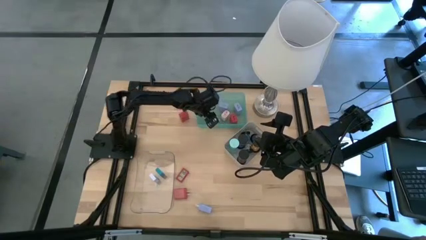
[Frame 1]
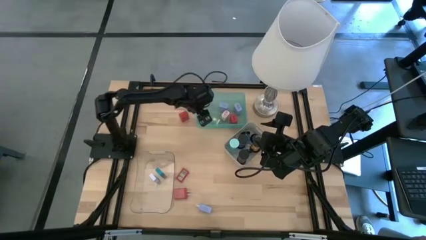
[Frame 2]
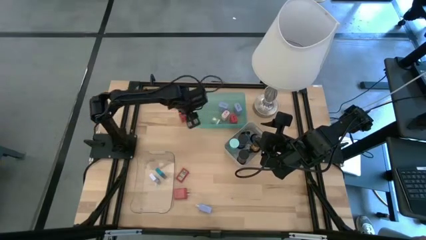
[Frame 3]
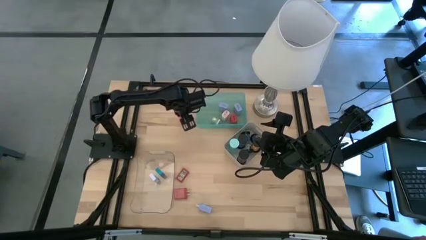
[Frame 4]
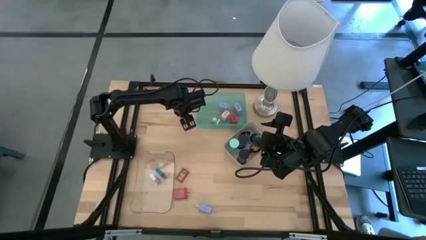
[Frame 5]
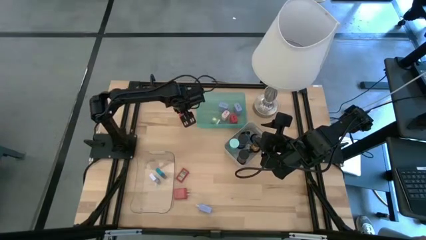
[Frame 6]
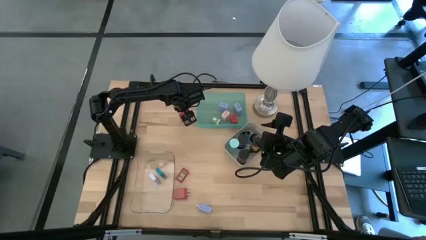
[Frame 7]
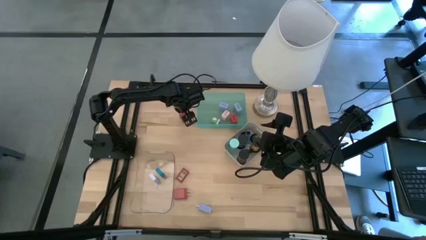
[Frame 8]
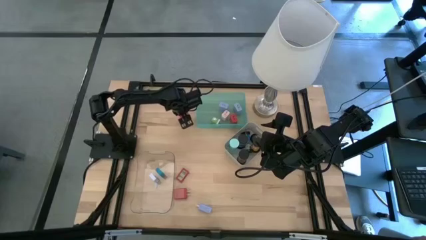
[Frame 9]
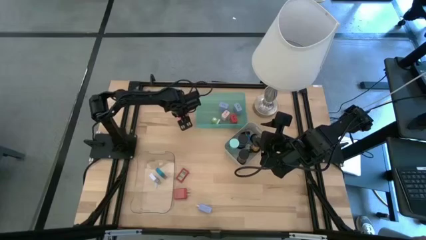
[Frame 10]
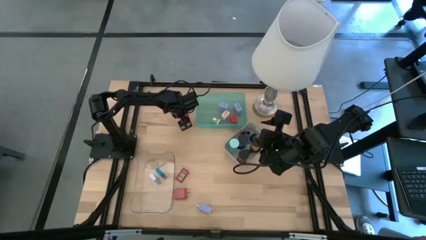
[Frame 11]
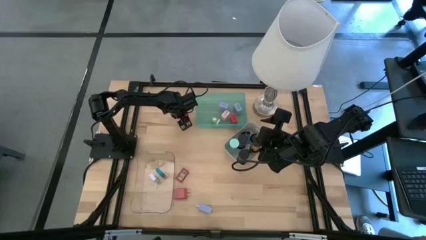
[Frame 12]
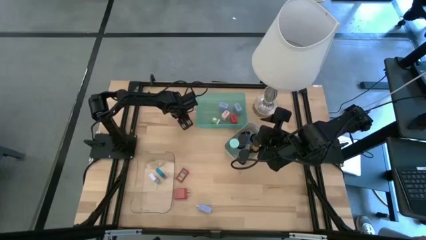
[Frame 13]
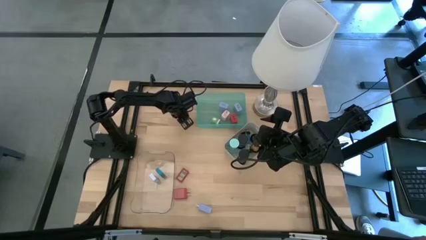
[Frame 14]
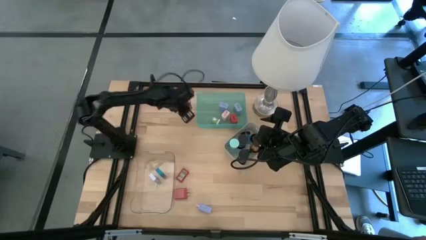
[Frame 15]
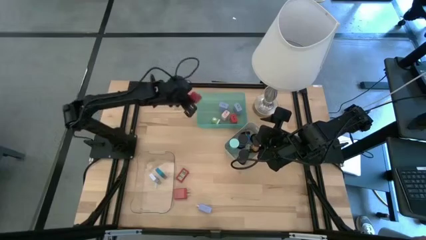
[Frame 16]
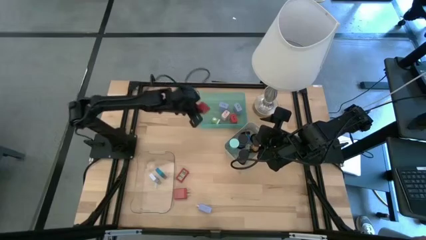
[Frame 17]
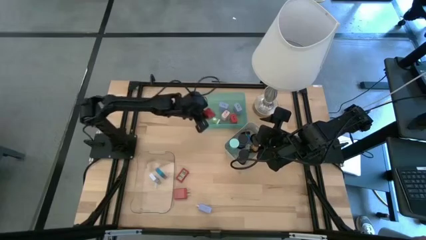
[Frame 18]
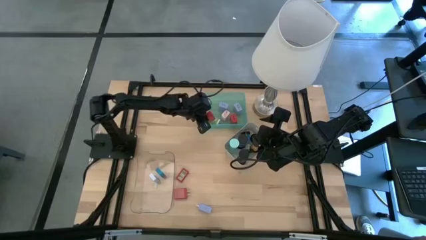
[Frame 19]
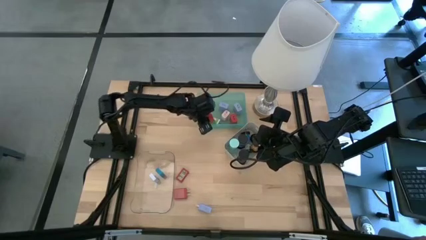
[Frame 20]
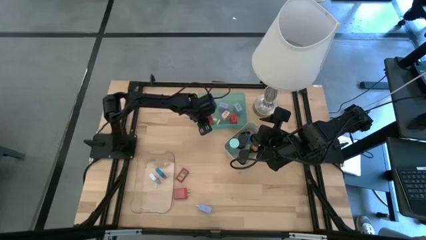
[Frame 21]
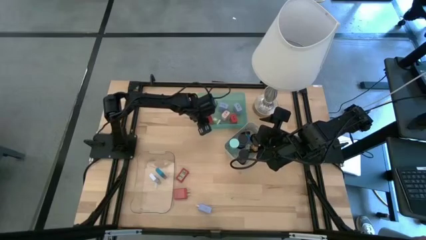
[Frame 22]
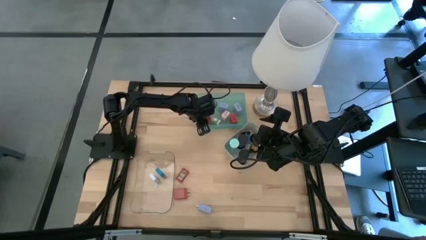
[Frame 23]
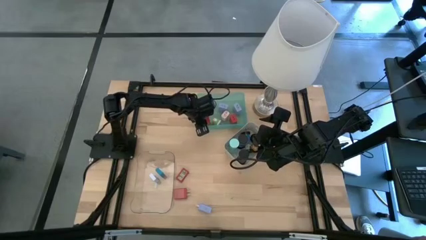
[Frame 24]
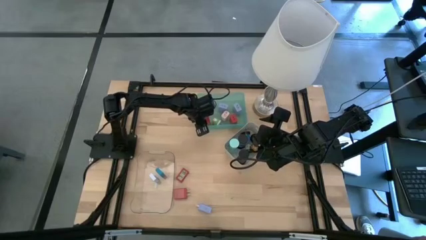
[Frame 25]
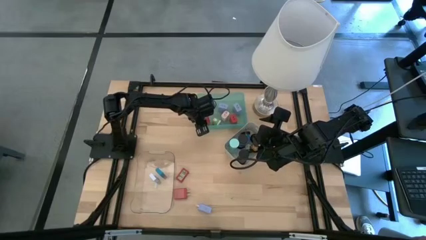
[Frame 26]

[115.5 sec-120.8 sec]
Task: Pick & Place Office items
Put the top red charger adapter into the green bin

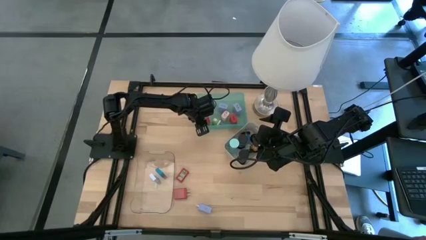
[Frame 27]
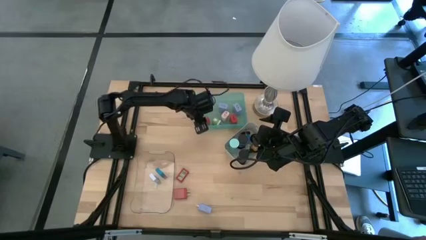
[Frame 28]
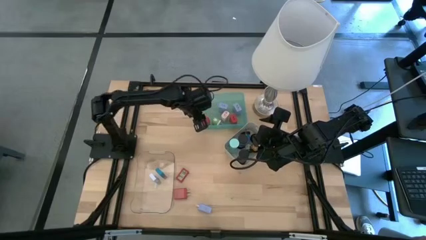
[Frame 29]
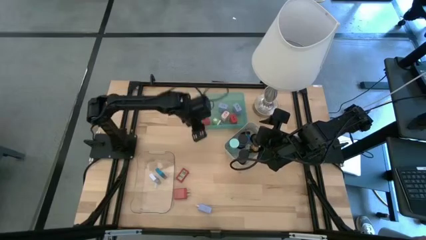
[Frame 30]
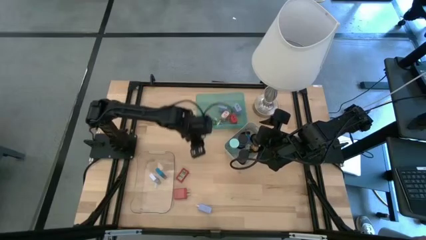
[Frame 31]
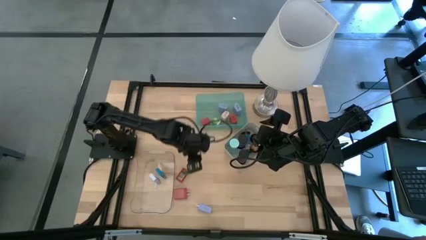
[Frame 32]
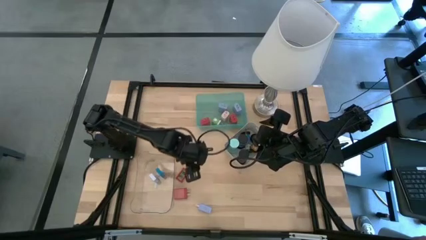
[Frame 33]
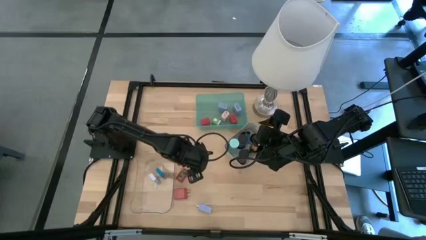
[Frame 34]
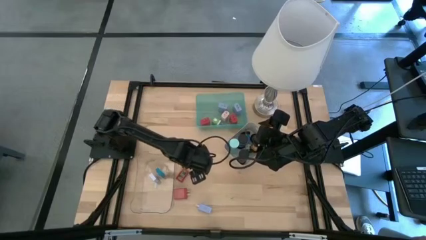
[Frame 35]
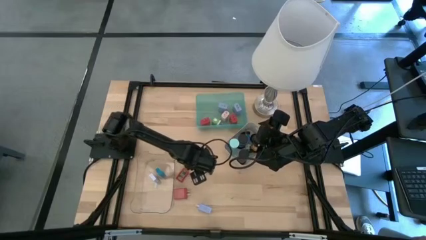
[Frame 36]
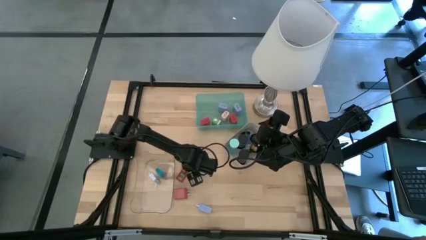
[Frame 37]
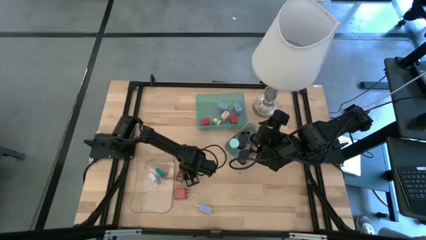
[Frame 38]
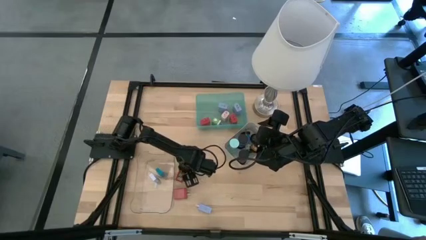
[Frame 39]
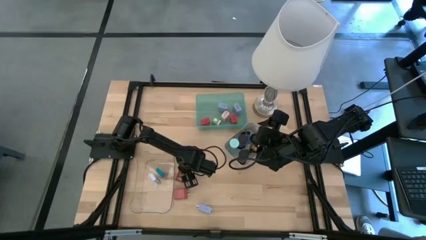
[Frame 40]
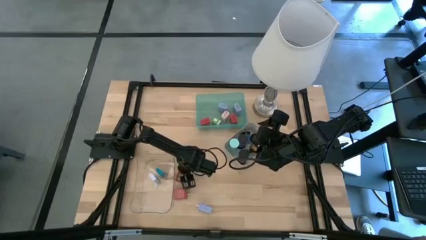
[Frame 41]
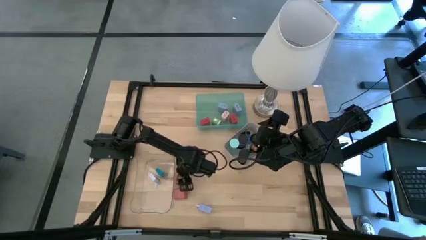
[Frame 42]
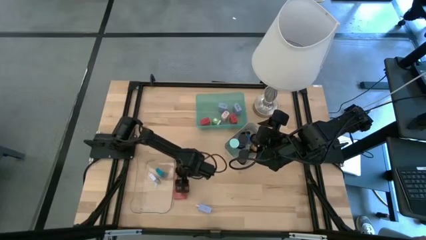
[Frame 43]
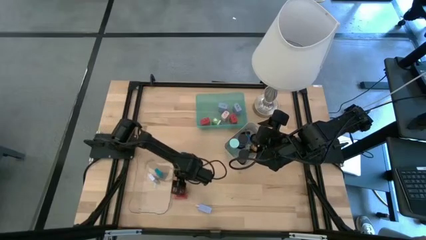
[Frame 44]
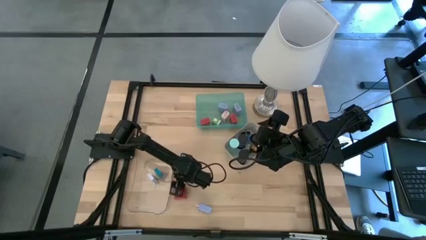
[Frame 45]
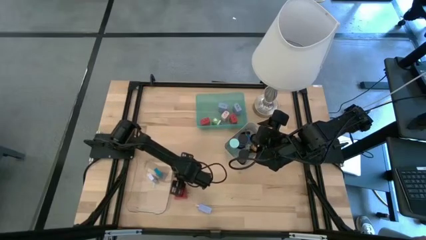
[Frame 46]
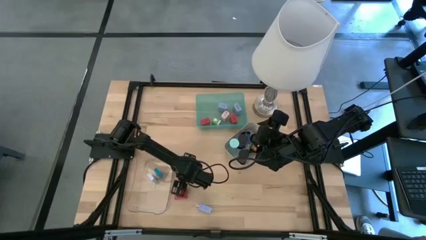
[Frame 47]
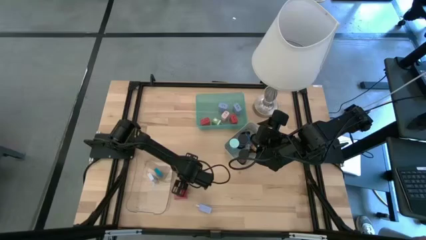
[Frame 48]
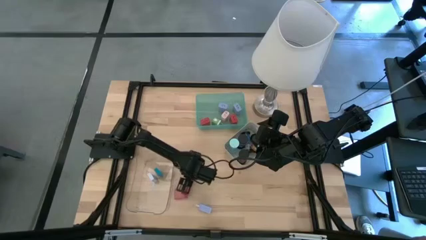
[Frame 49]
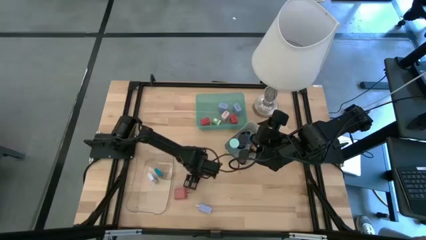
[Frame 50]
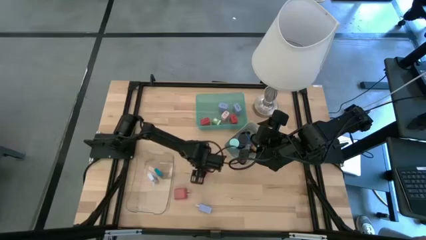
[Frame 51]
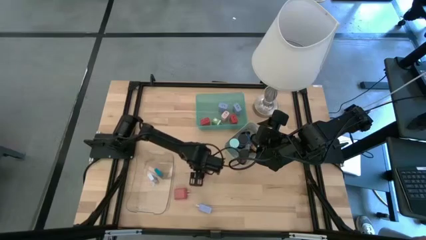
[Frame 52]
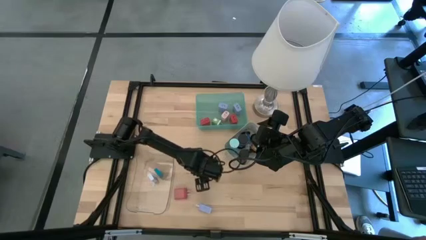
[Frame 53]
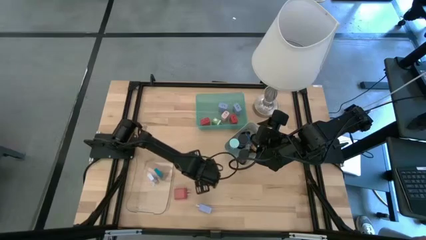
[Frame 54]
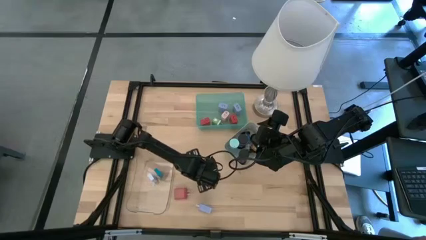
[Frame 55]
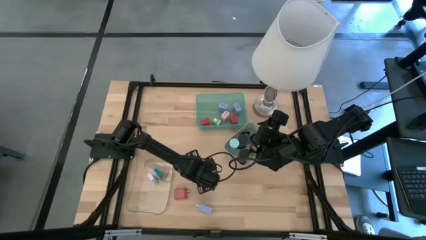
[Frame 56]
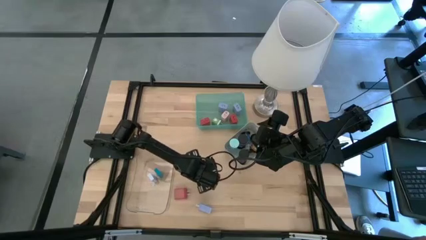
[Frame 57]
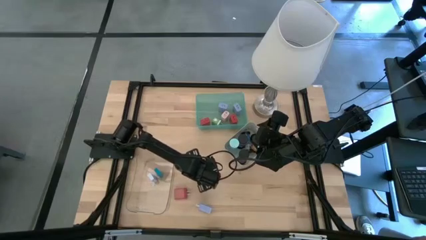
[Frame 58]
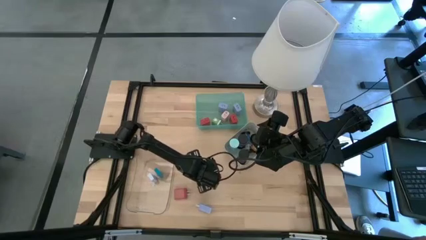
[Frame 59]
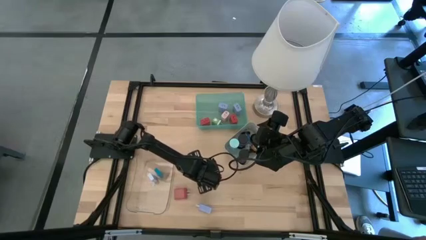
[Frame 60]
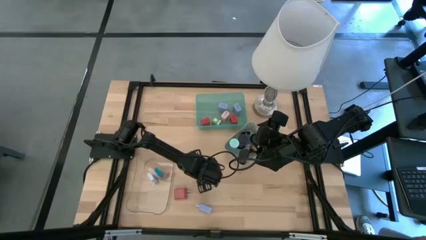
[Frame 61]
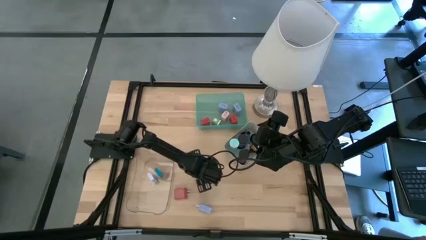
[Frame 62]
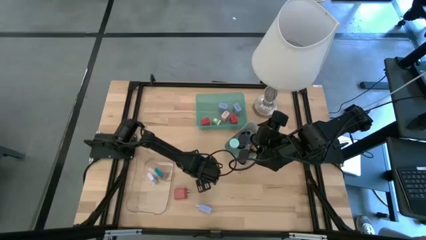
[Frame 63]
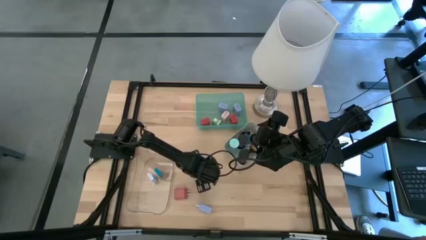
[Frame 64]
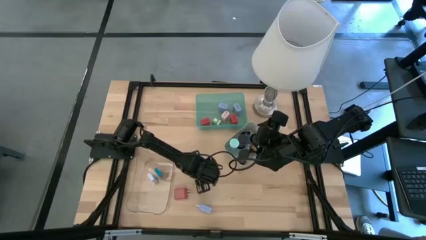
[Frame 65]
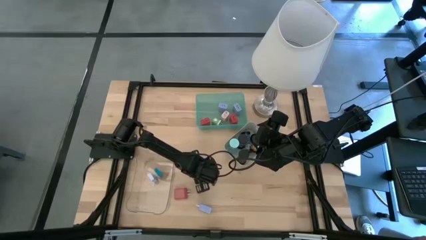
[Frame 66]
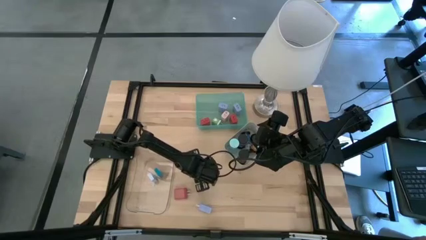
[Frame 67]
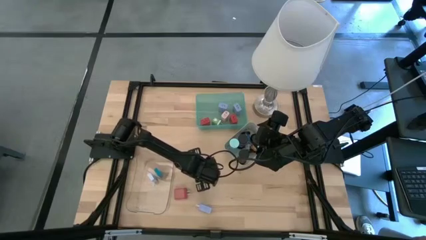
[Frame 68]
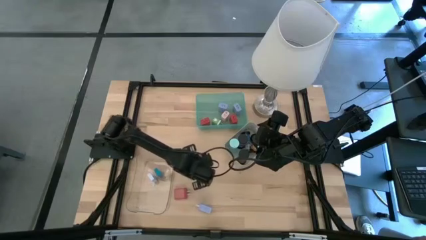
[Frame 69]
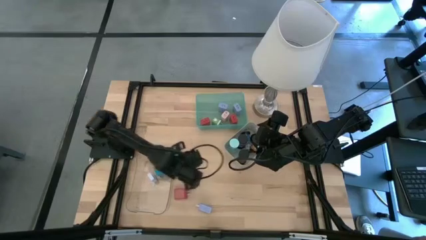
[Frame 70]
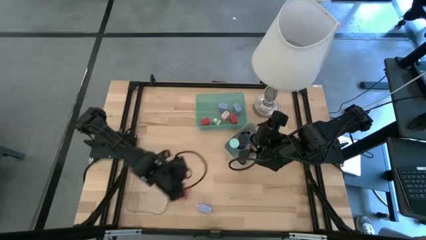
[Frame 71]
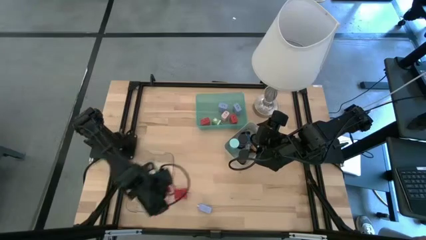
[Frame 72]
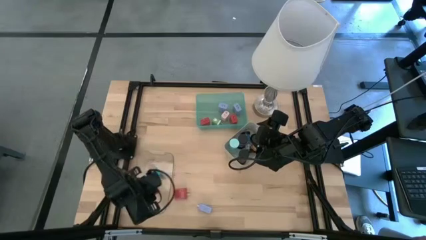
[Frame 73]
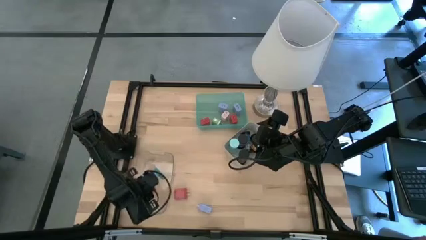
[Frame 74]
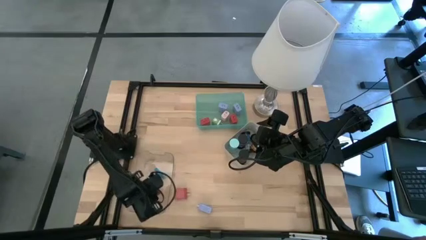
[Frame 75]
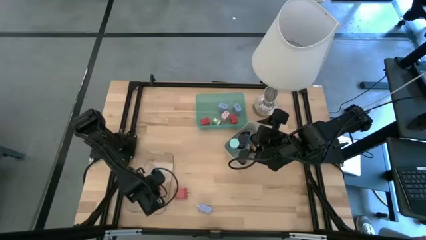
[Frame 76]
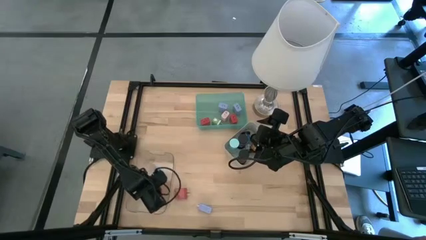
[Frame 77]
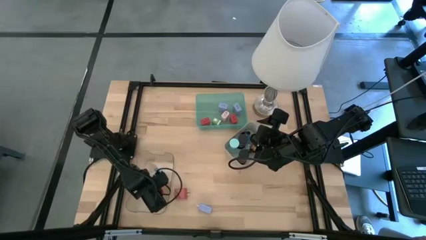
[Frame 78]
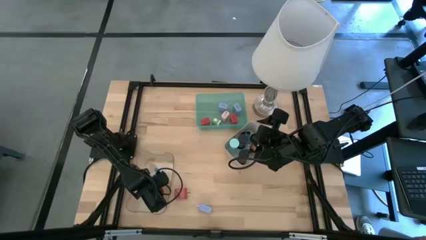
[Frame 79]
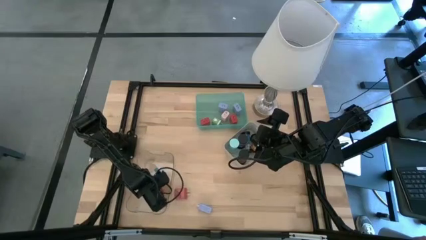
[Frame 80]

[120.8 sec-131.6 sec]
Put the red digital clock into the transparent bin
